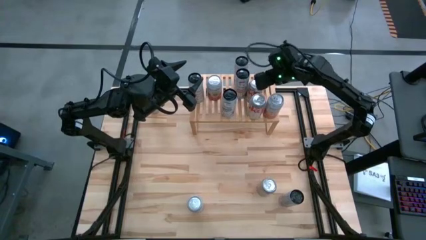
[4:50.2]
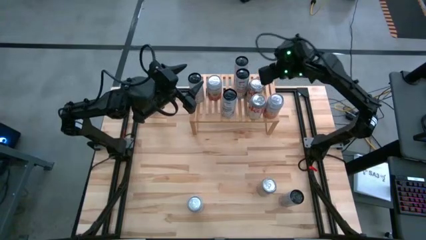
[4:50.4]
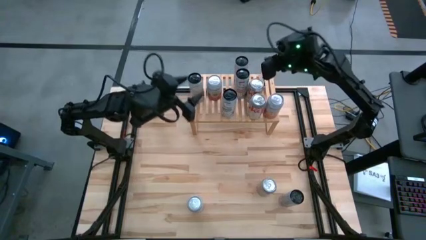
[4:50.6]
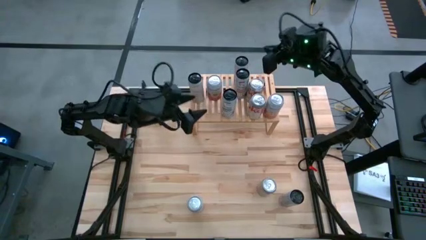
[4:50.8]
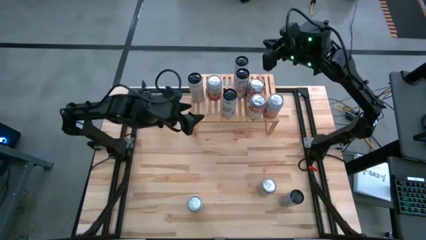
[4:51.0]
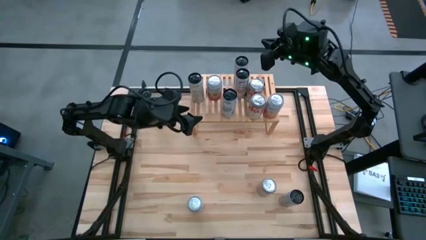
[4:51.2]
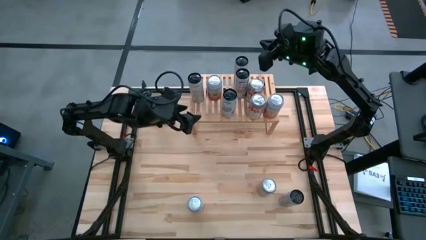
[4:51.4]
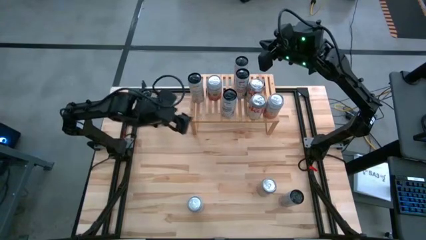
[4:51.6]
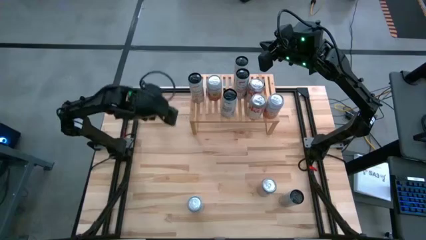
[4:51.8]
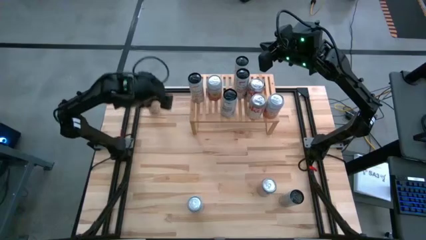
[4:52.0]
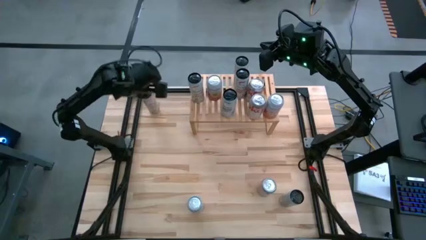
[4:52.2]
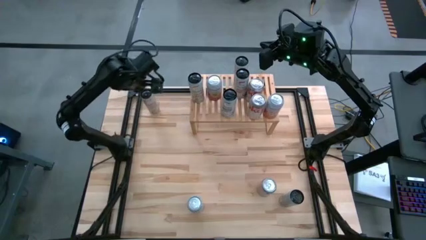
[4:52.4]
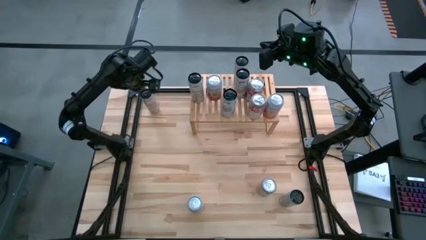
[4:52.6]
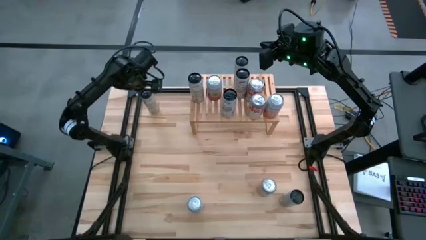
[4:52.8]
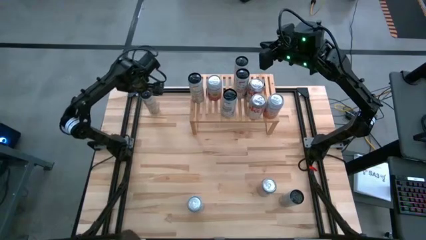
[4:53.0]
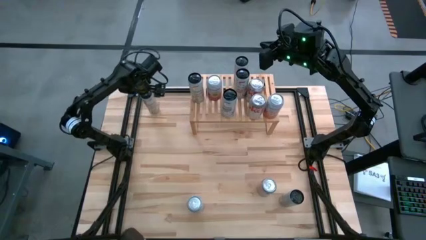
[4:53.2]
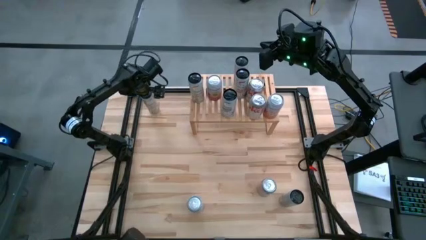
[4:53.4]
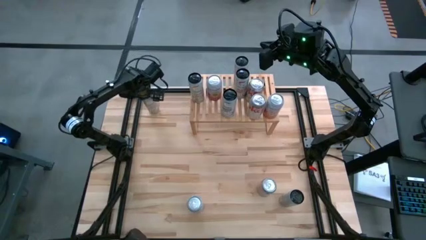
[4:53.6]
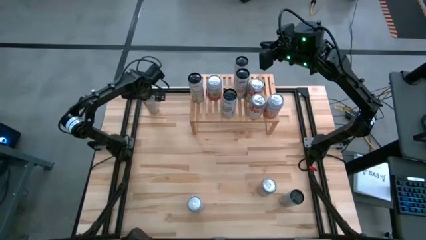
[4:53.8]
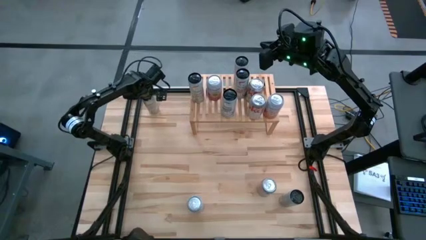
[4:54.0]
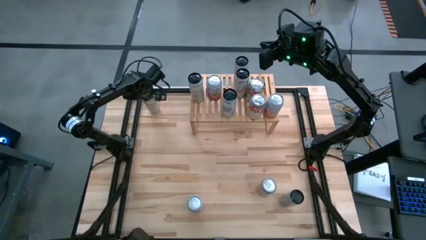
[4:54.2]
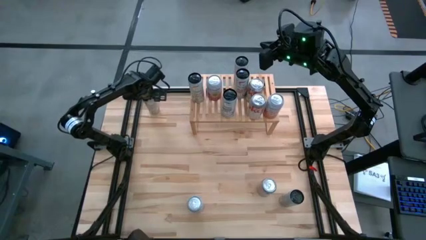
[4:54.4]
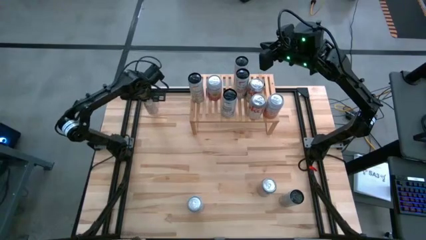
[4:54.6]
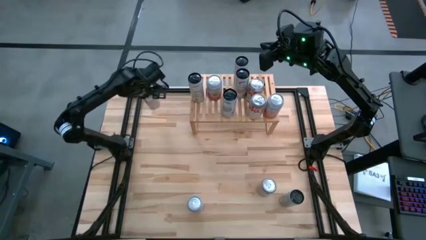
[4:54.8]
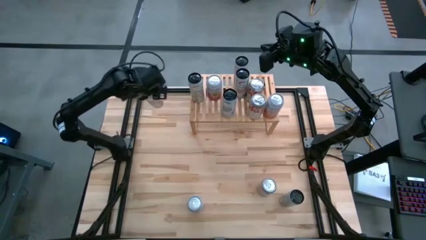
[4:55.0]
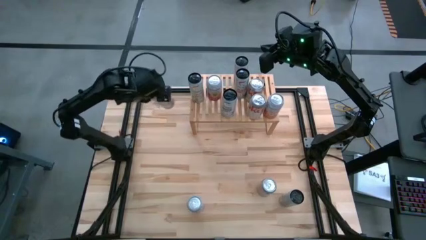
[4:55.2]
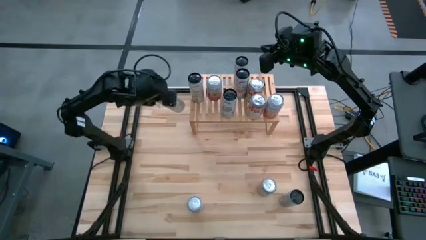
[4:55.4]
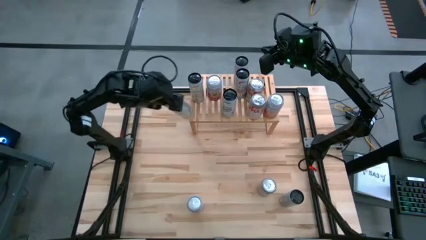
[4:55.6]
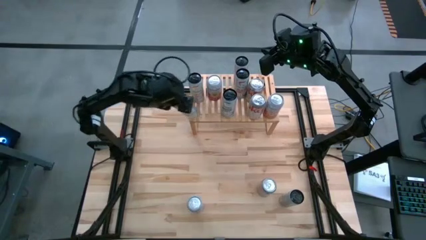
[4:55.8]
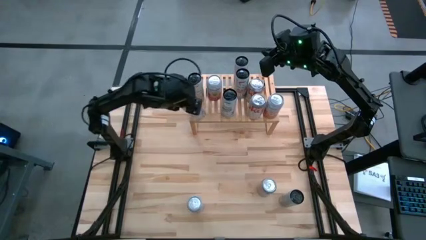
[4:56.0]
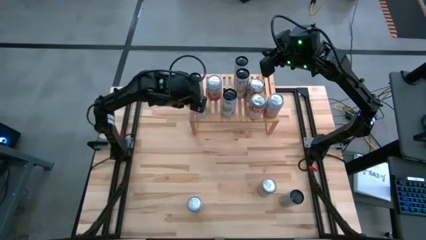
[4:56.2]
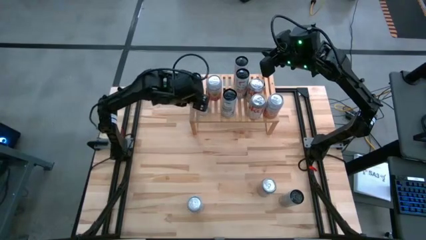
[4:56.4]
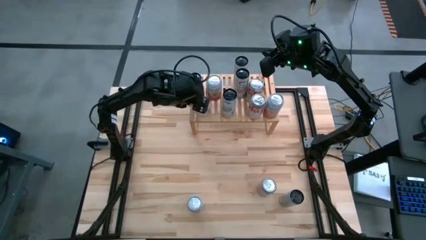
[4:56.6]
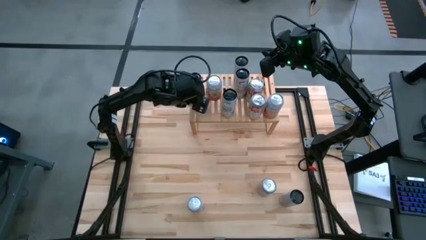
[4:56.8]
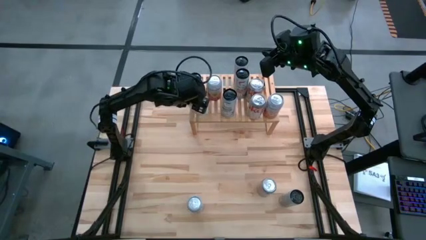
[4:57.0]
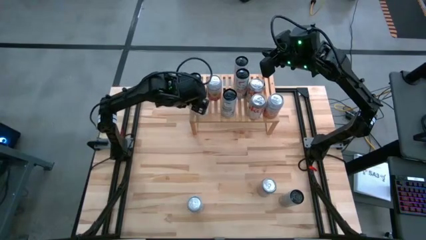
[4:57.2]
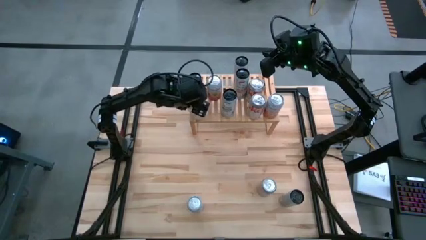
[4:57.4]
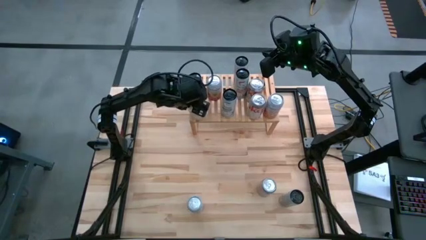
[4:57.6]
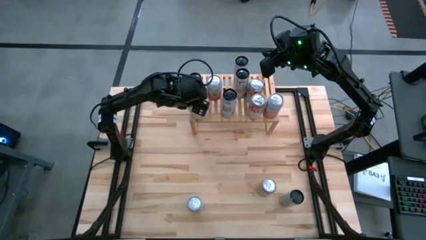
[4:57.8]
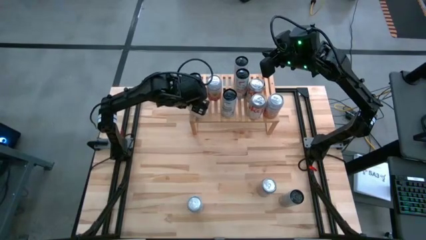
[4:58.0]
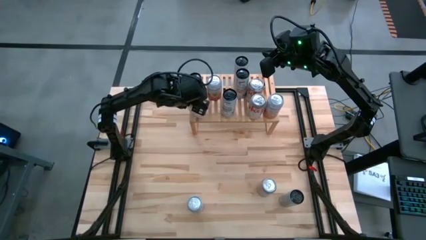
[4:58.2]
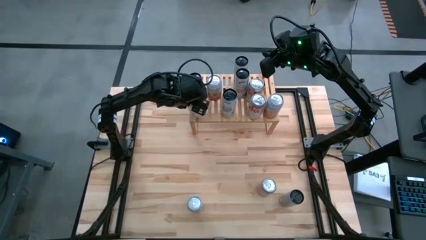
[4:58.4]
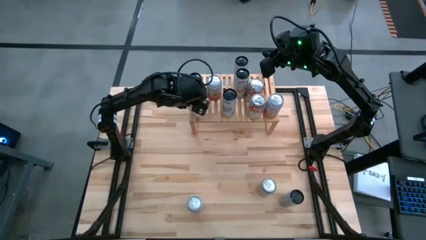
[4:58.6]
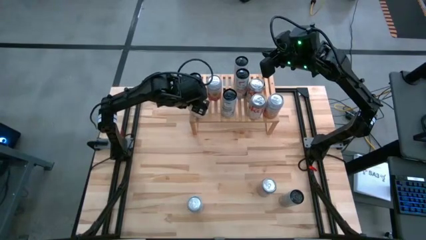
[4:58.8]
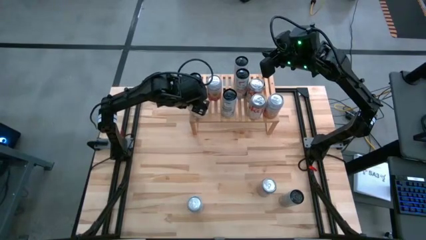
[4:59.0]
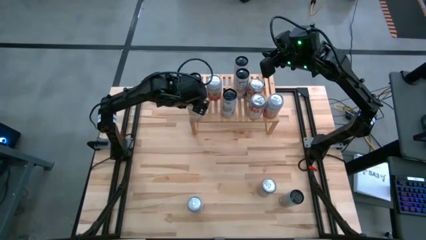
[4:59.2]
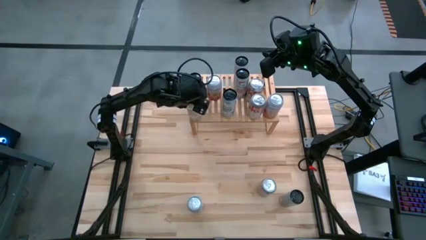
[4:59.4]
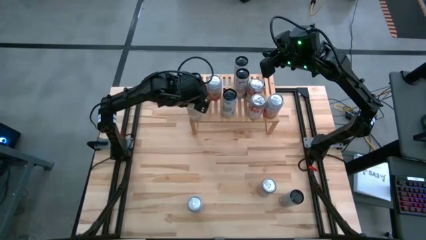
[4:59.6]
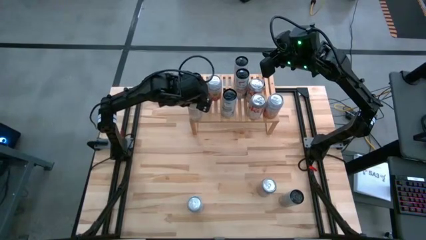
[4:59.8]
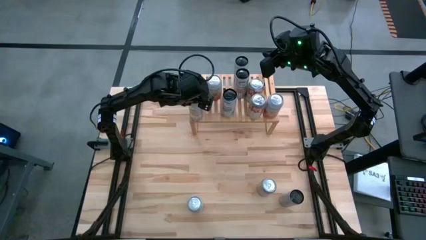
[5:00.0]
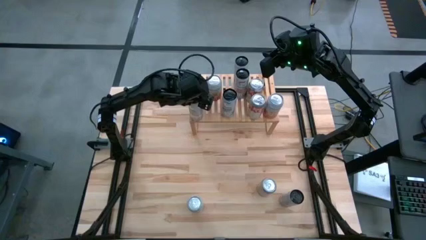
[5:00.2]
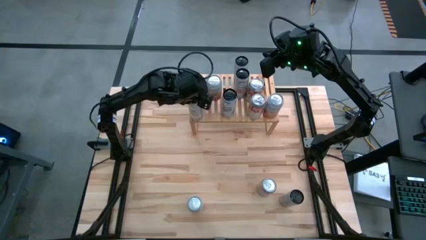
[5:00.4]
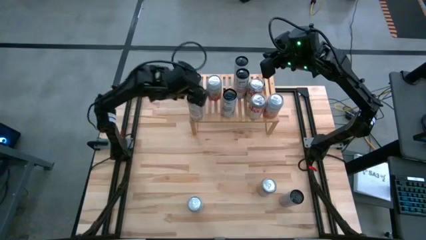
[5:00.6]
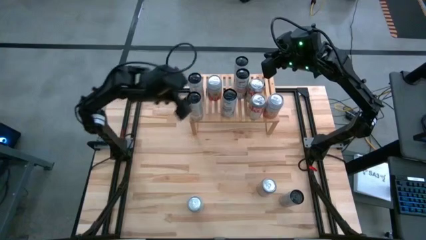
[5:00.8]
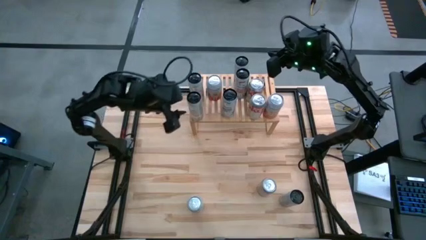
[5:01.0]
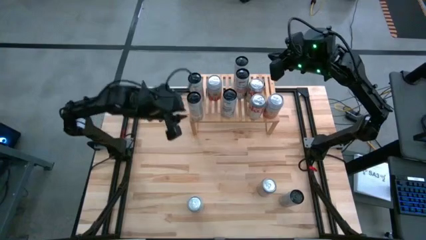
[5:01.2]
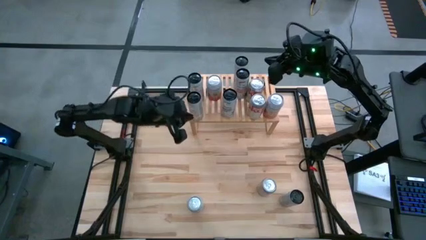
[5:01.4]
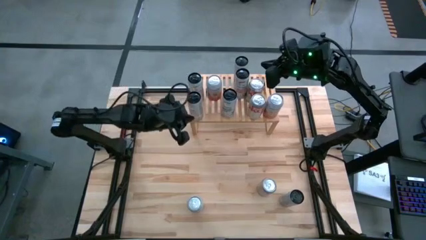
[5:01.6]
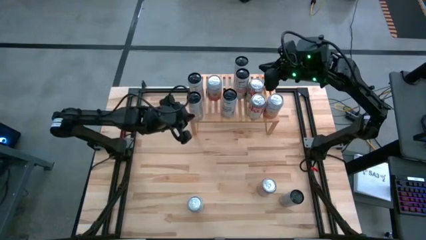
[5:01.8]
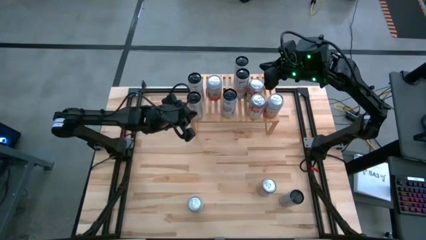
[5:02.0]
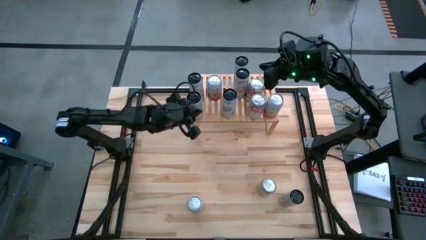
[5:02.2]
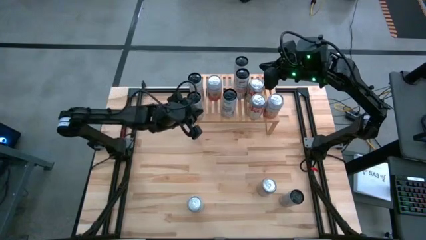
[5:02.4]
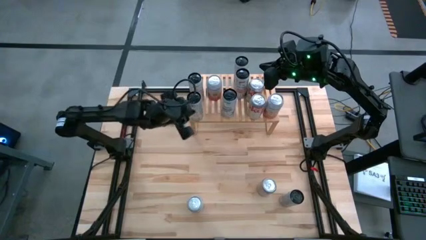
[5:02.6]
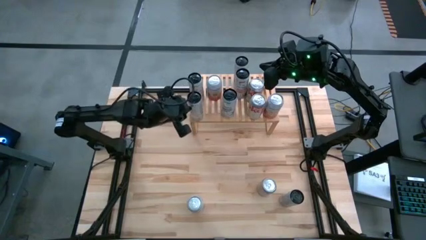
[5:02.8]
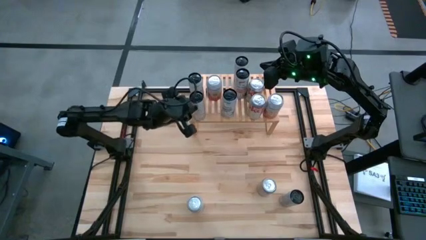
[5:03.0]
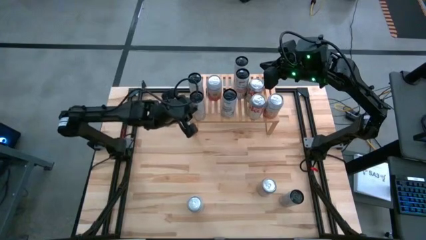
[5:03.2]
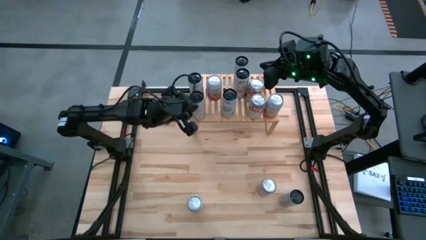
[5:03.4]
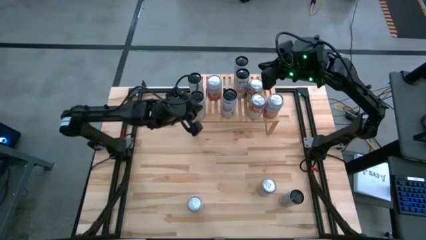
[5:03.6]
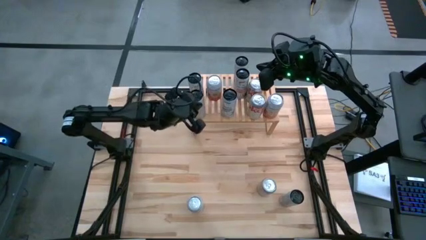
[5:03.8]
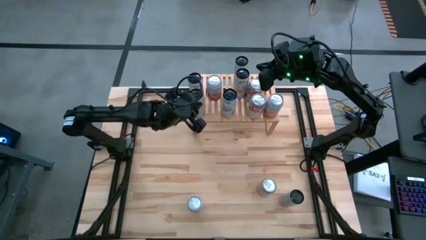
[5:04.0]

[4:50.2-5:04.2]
Task: Place canned beverage on shelf
Put the white and yellow soda can on the shelf aligned with the other white and yellow soda can

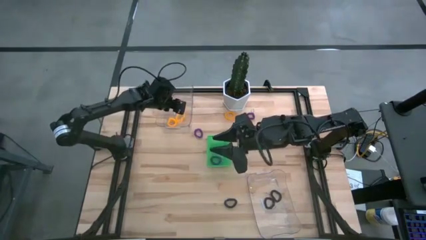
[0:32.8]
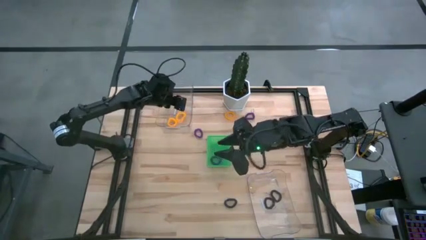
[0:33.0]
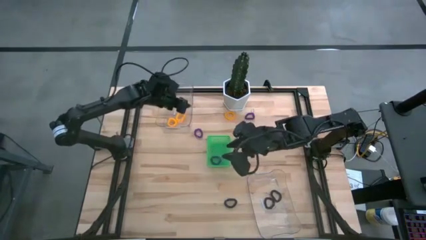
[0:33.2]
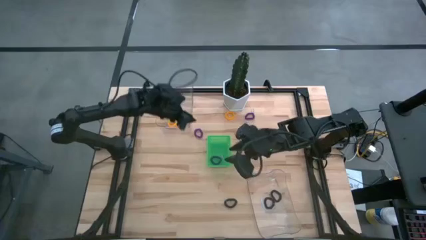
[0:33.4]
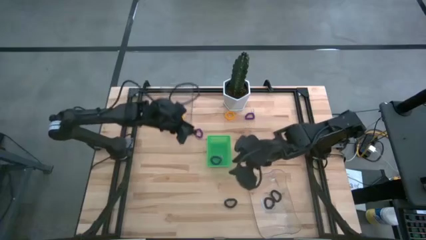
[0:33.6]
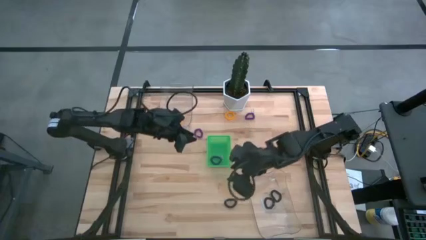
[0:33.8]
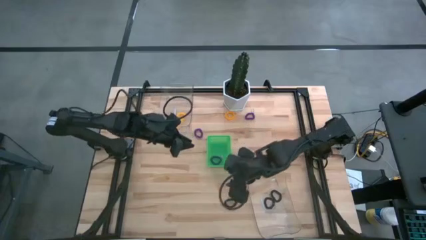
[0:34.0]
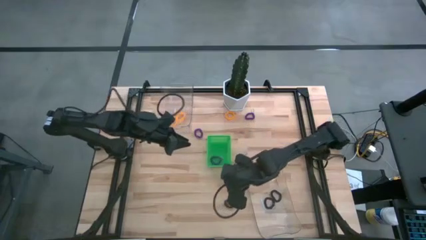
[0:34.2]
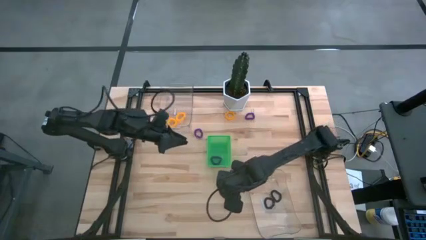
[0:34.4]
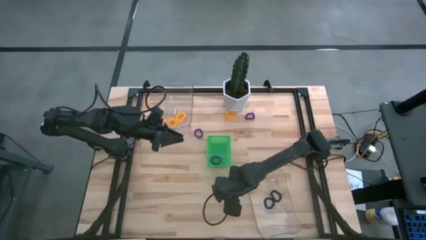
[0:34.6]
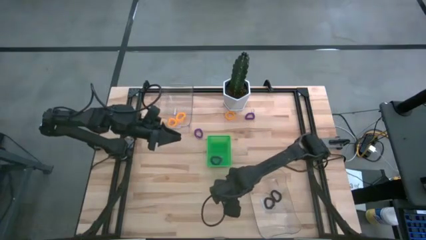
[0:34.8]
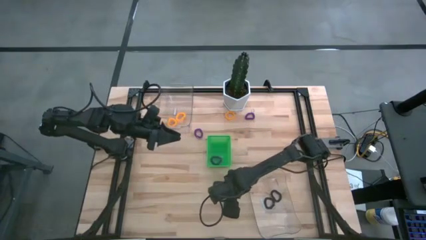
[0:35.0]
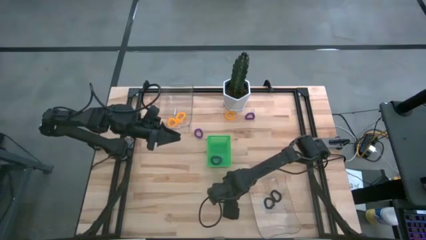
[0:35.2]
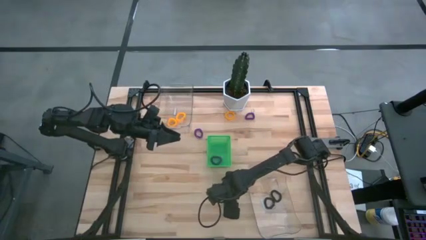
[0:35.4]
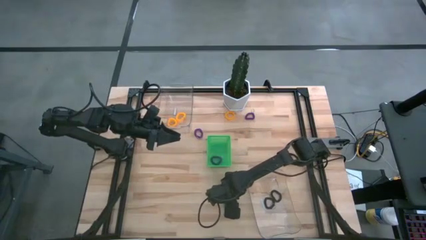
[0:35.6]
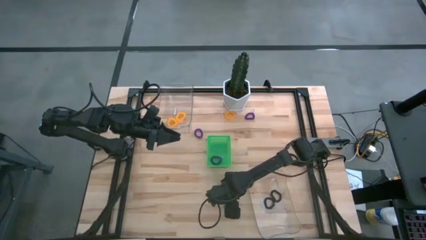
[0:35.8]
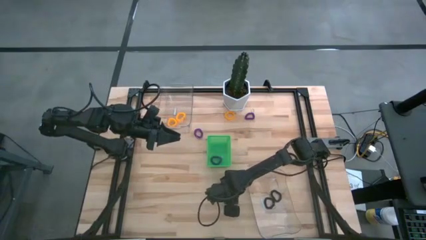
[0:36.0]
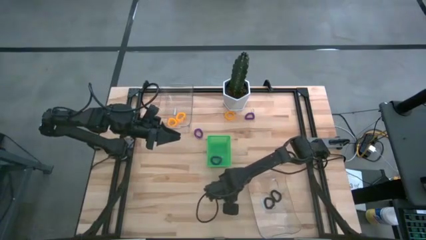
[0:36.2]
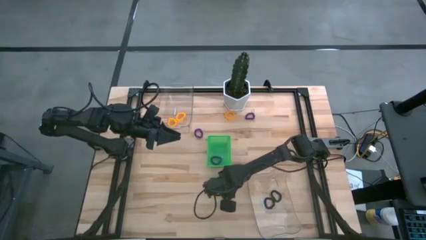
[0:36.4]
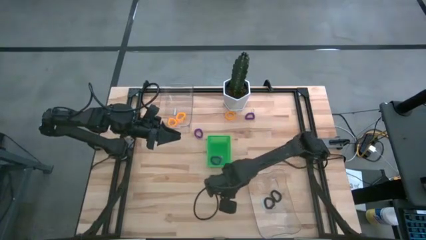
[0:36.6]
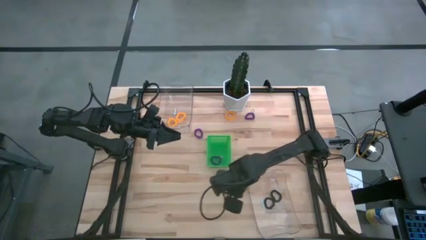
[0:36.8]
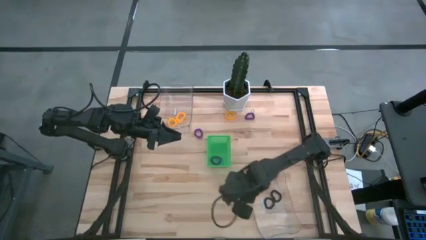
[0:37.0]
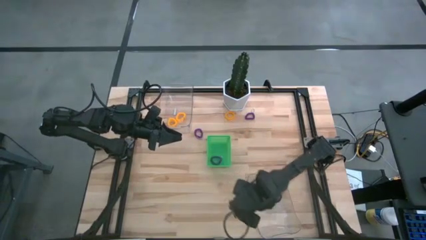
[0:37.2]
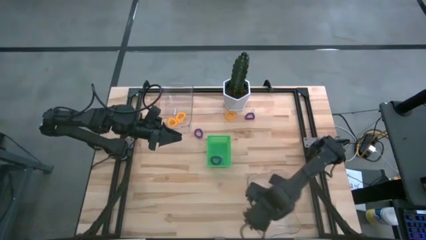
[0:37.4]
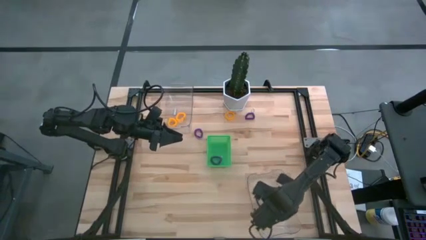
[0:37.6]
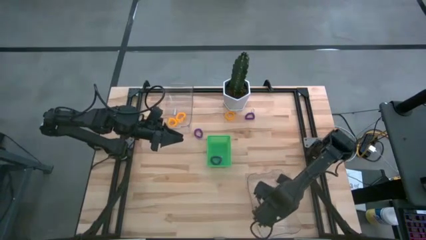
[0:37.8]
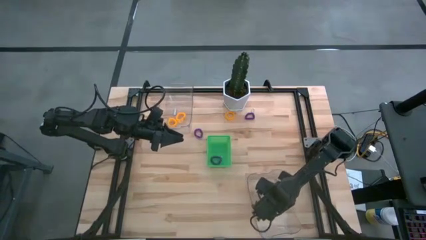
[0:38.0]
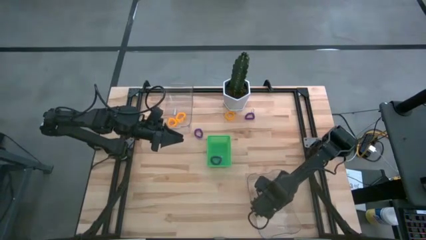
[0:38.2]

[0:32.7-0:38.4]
Task: Sort spring keychains
Put the black spring keychain into the bottom transparent bin
